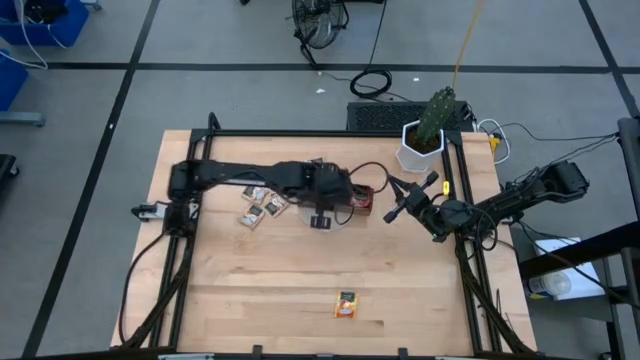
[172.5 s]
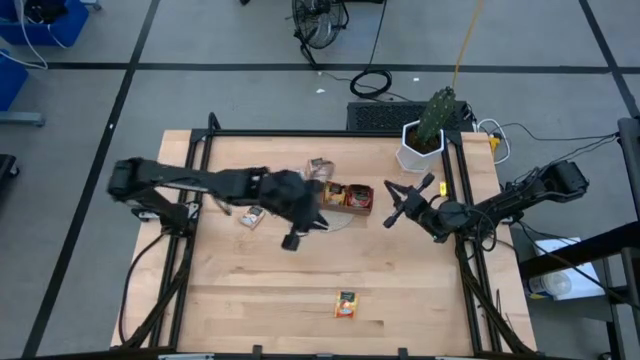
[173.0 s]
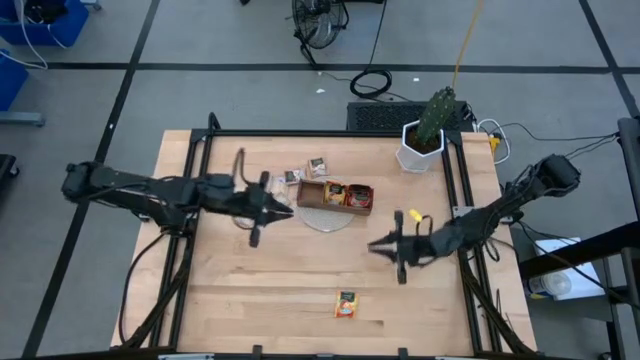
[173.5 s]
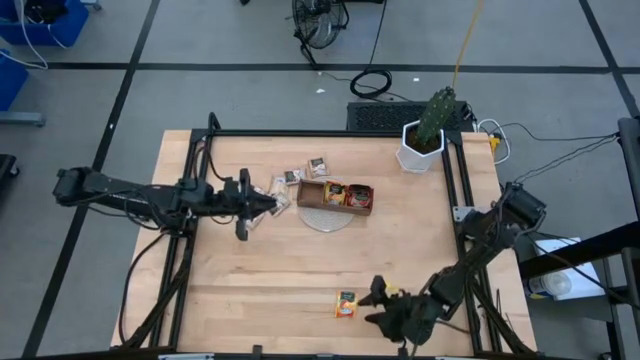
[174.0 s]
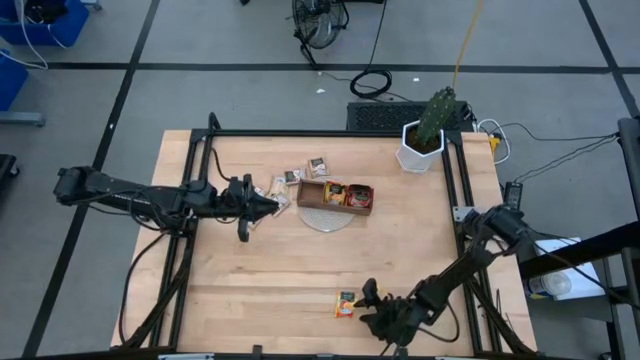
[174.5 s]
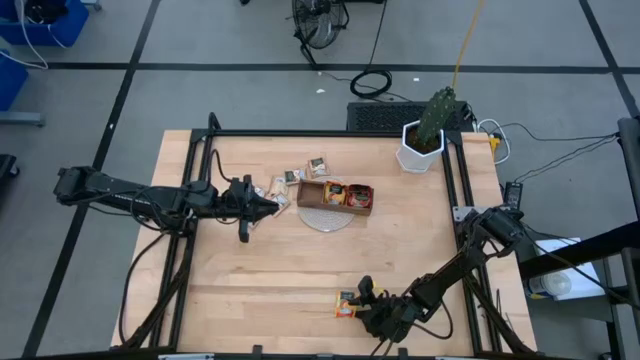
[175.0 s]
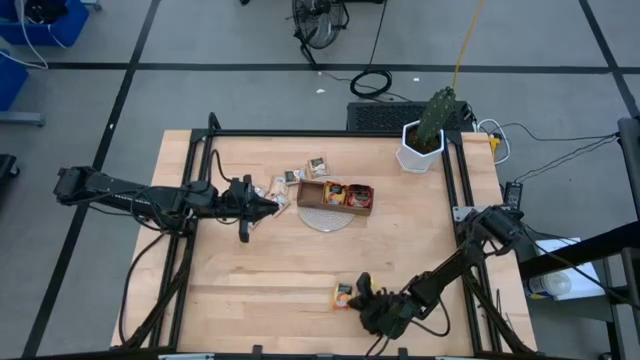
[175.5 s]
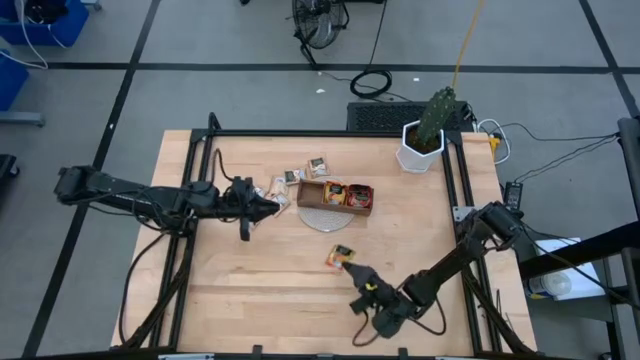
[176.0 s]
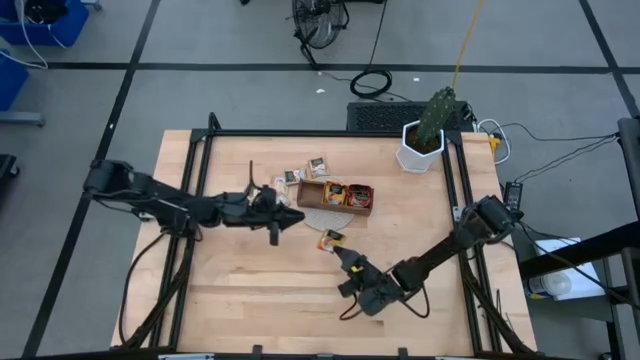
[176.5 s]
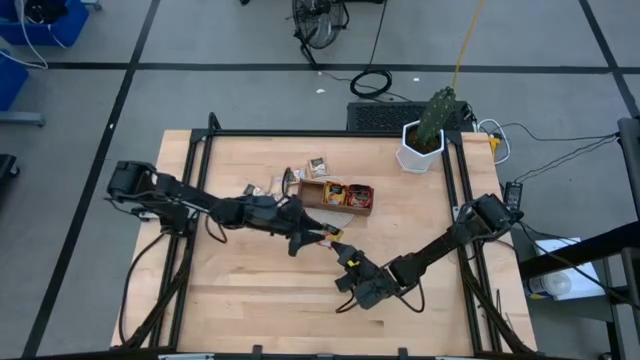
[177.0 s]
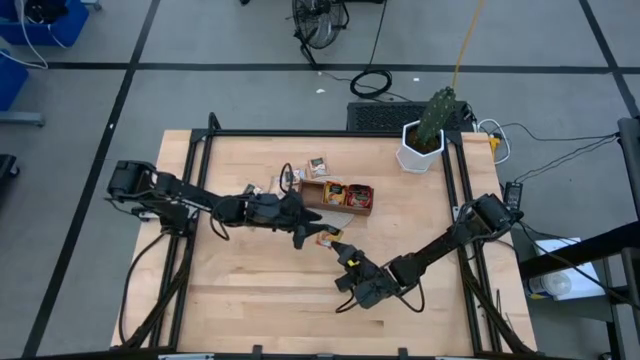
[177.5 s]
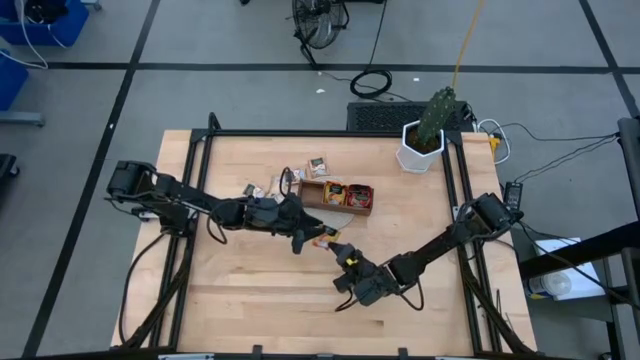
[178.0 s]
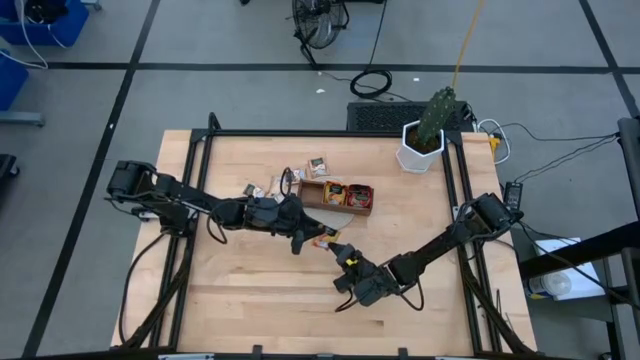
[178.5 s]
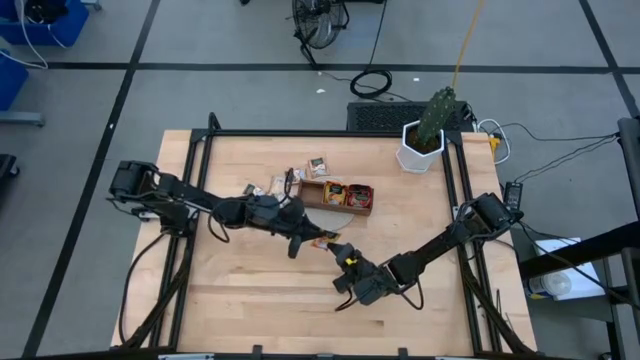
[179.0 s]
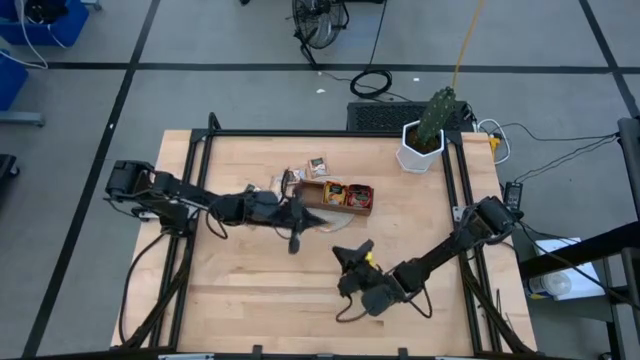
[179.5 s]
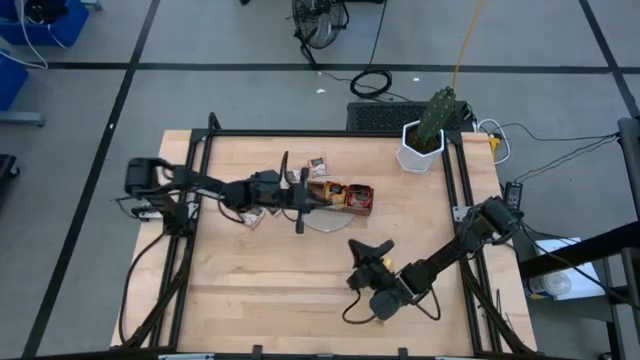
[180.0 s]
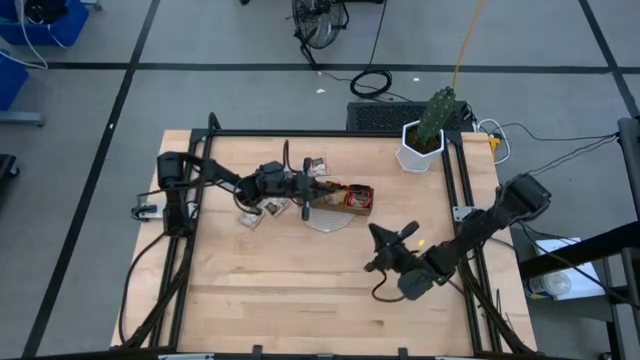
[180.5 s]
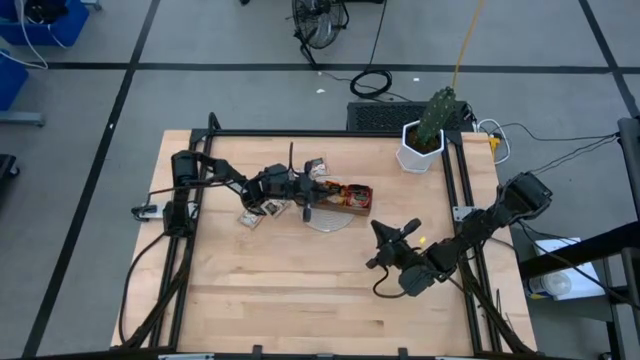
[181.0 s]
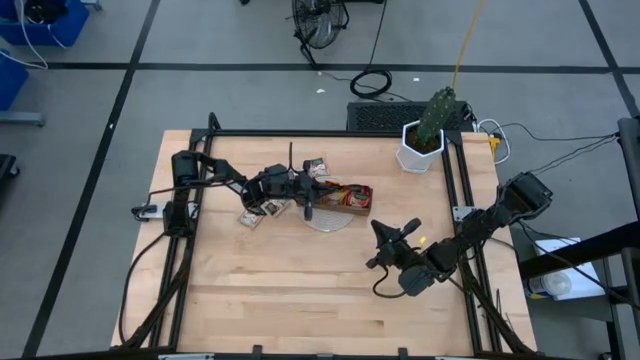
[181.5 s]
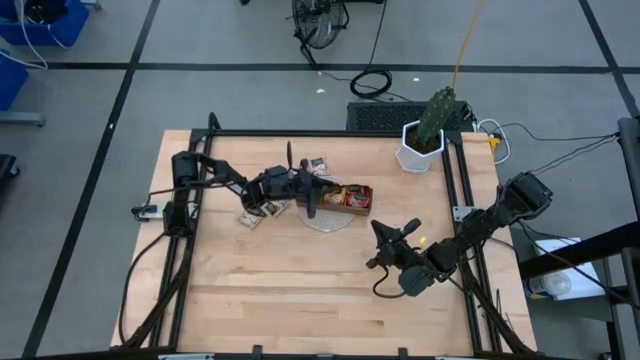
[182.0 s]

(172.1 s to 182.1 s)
Task: Pick & Place Tea
Put the orange tea bag into the middle section of the wood organizer

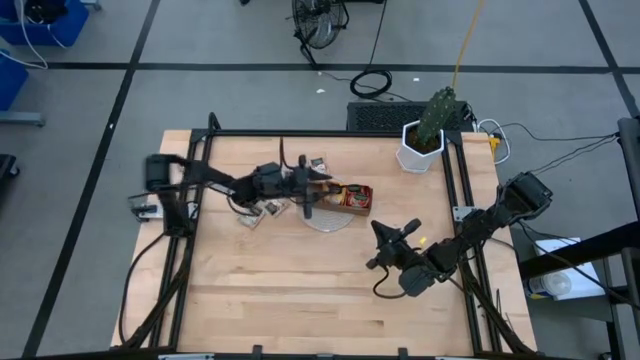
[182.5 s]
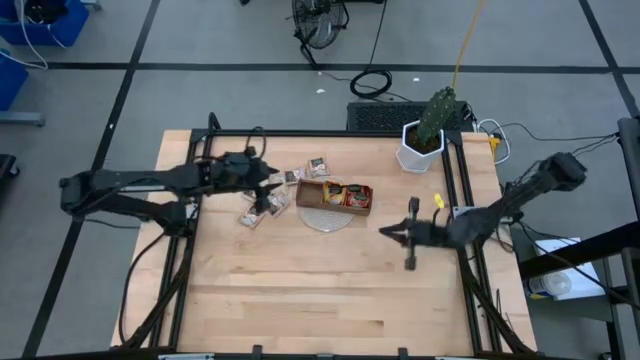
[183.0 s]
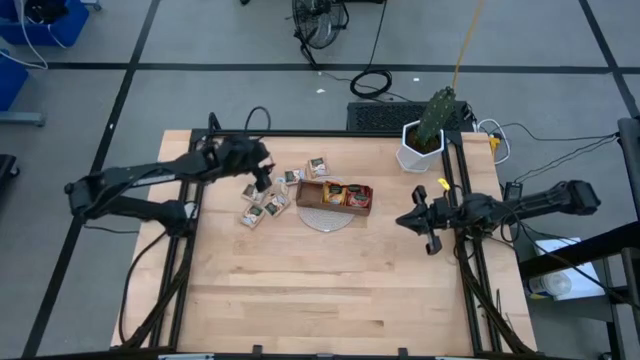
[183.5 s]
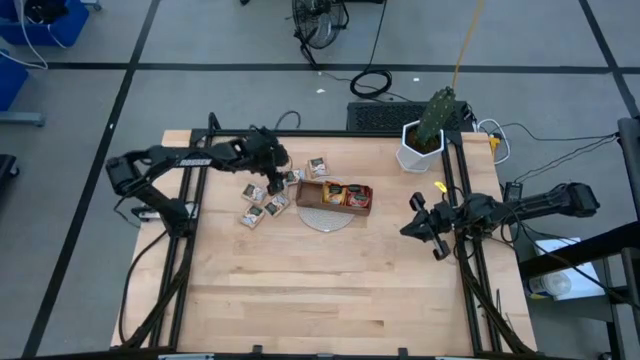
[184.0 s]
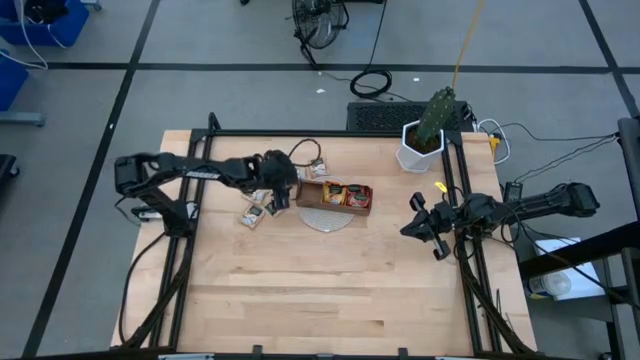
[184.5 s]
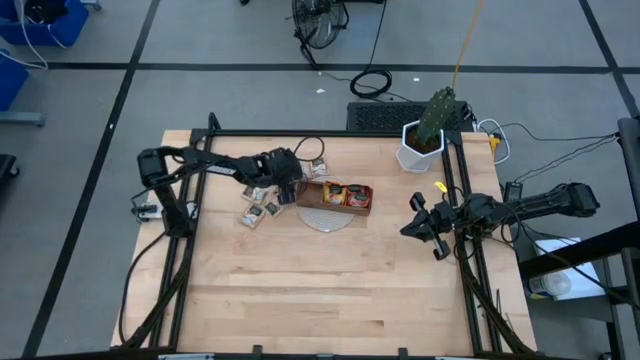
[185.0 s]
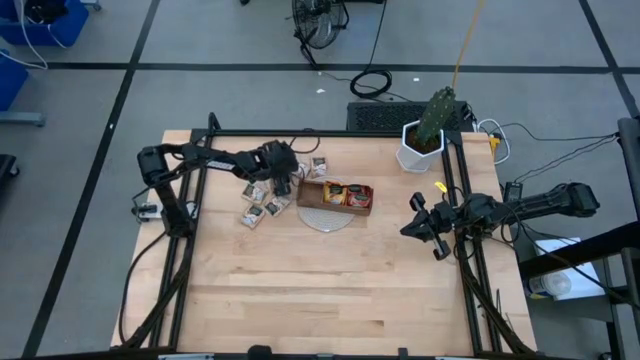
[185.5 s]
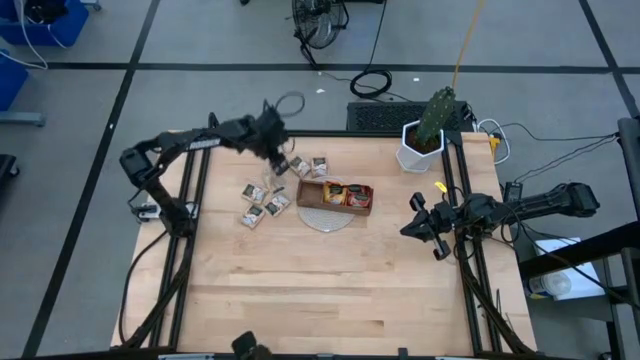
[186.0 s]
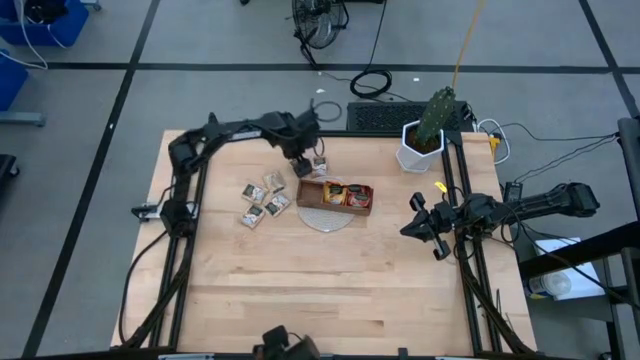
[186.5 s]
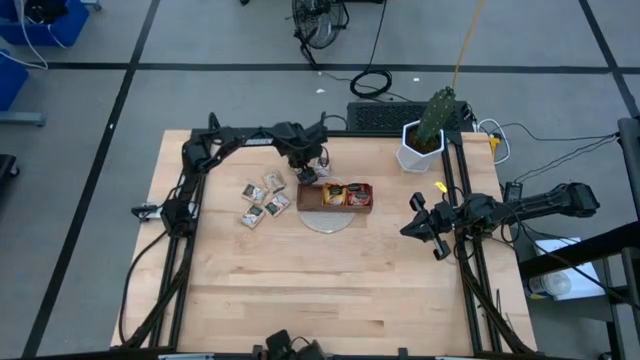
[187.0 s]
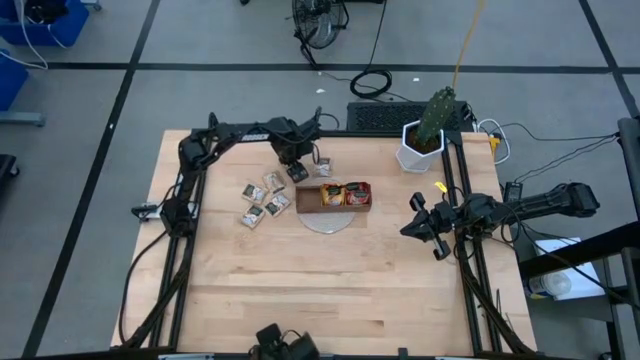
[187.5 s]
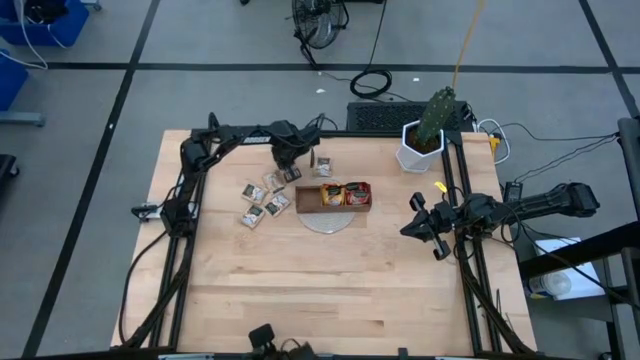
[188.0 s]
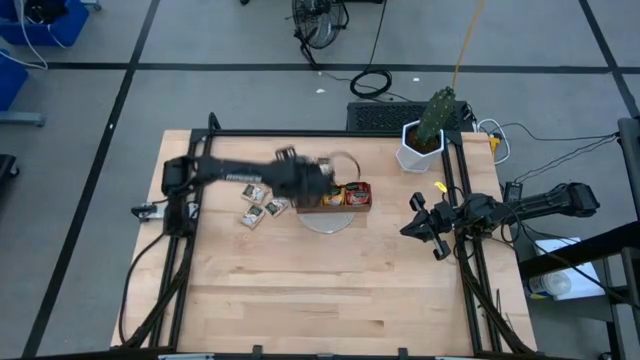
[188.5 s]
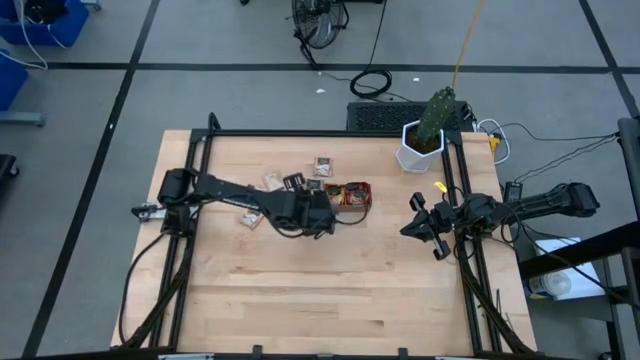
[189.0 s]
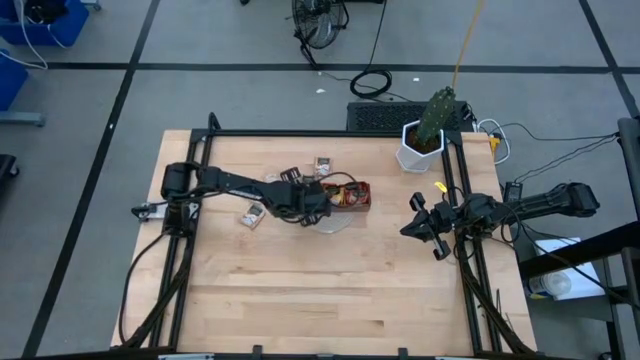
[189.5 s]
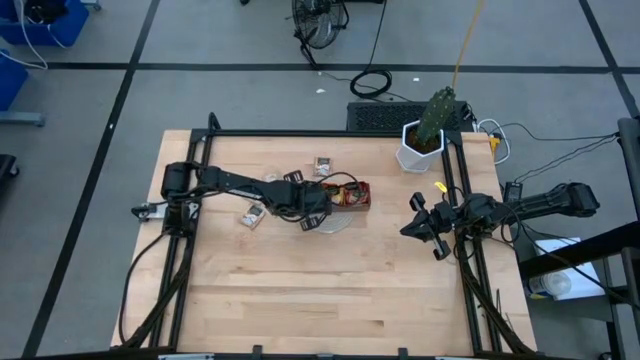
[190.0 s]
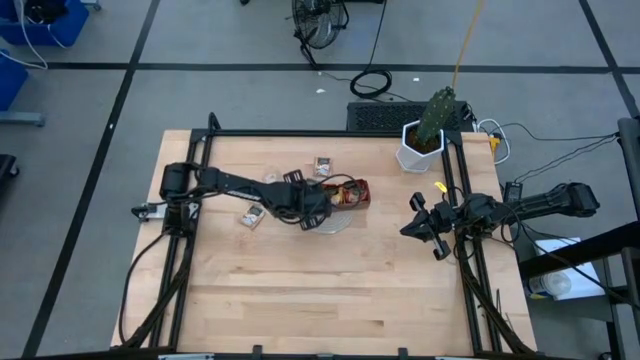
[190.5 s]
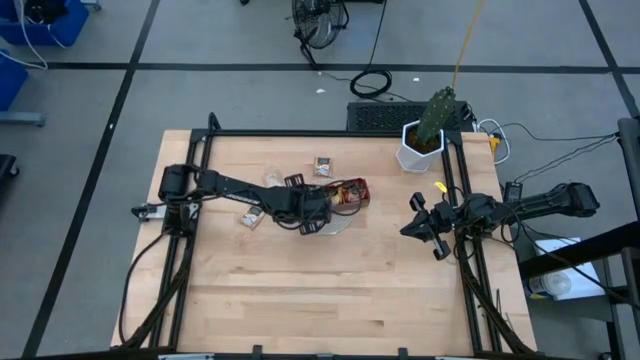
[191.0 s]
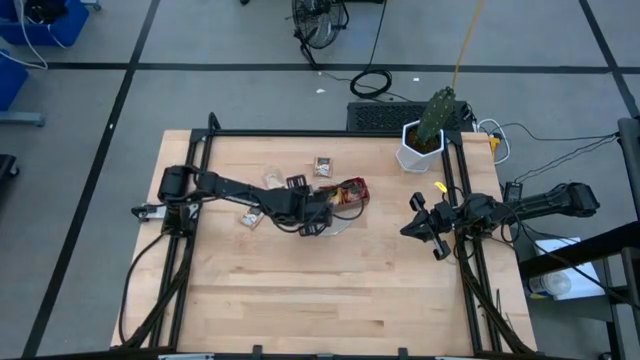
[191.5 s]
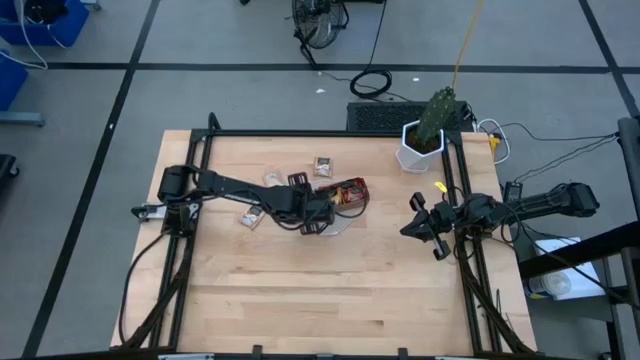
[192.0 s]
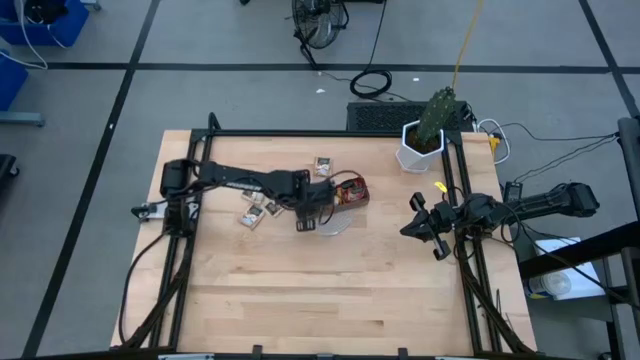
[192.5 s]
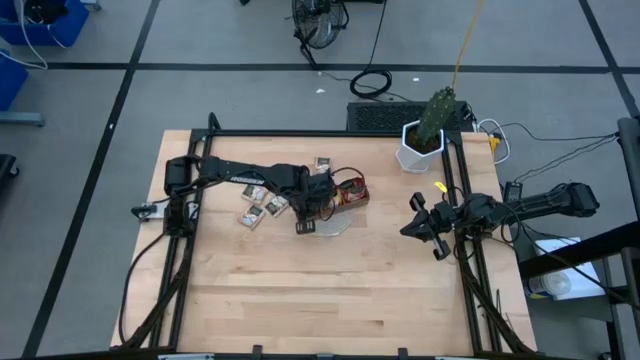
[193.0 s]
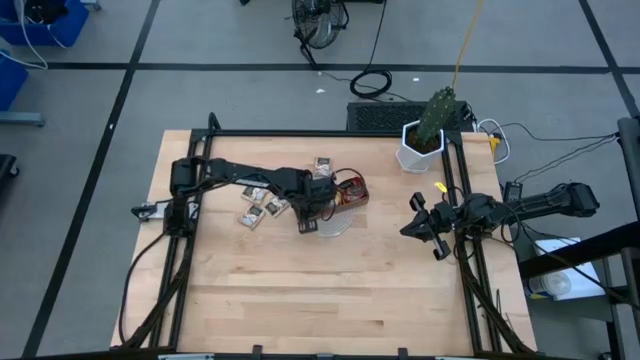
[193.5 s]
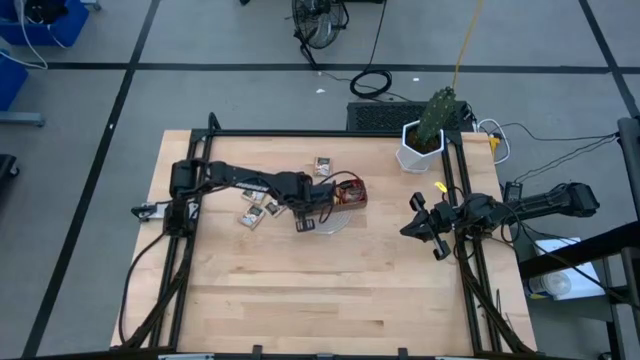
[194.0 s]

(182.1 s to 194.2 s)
Put the tan gold tea bag into the left section of the wood organizer
